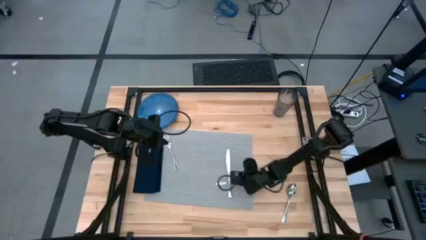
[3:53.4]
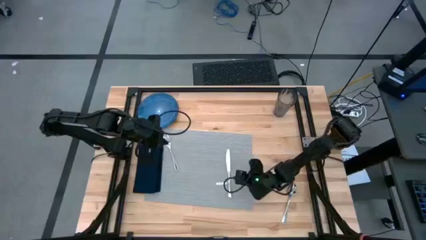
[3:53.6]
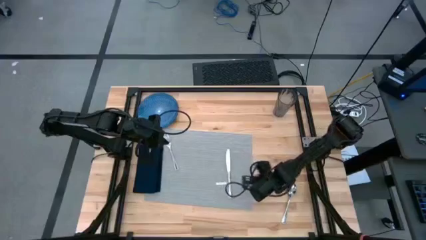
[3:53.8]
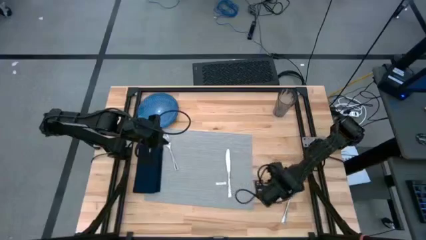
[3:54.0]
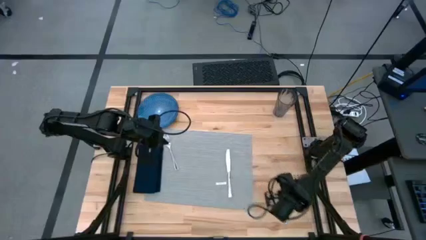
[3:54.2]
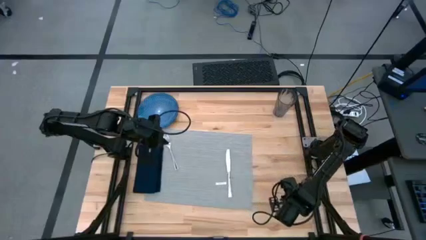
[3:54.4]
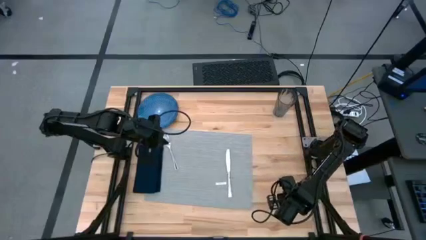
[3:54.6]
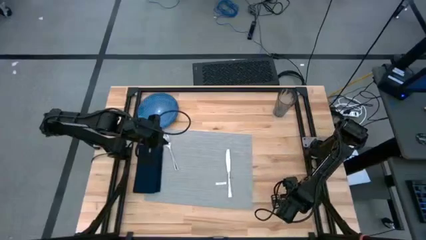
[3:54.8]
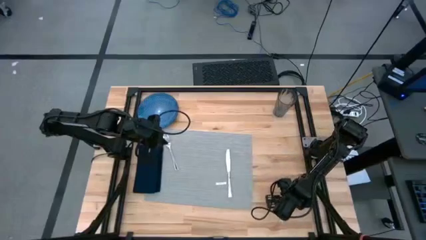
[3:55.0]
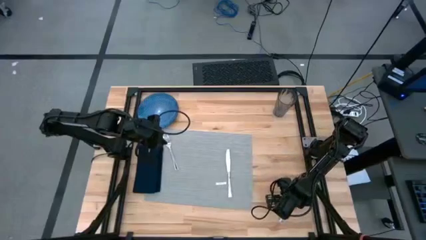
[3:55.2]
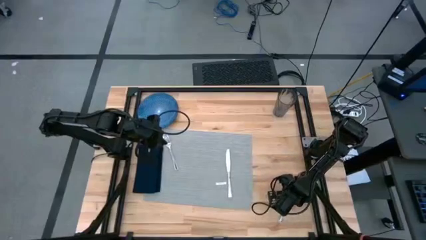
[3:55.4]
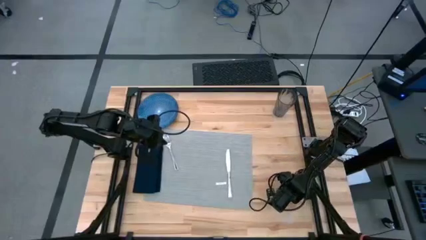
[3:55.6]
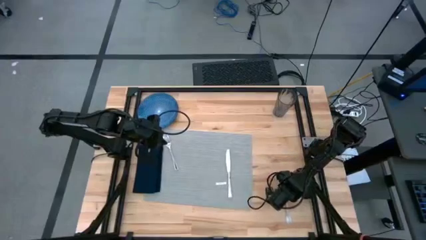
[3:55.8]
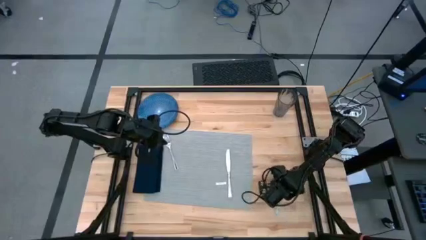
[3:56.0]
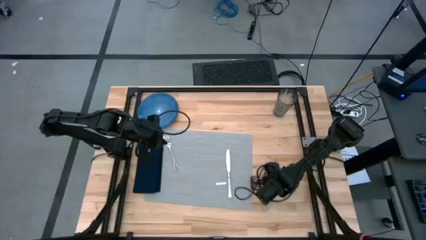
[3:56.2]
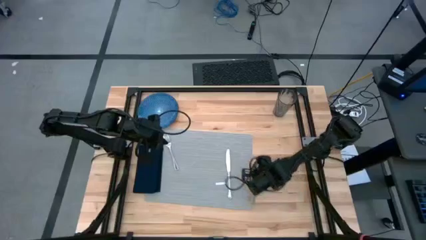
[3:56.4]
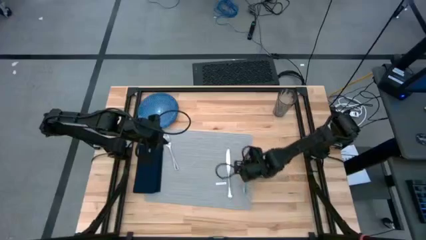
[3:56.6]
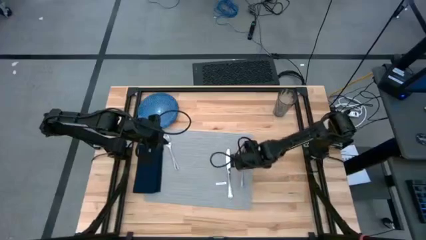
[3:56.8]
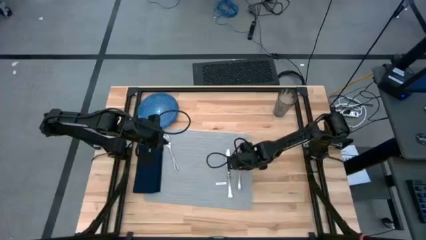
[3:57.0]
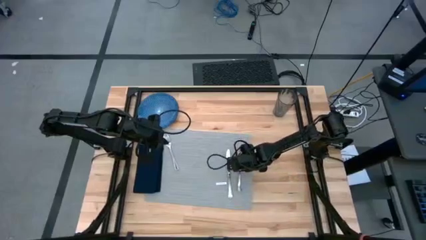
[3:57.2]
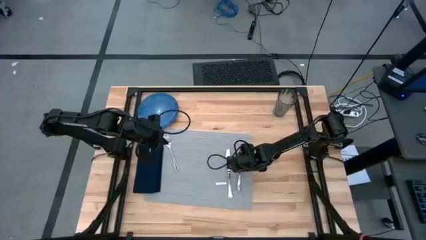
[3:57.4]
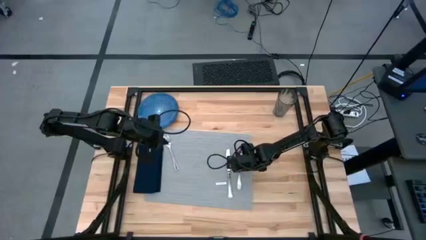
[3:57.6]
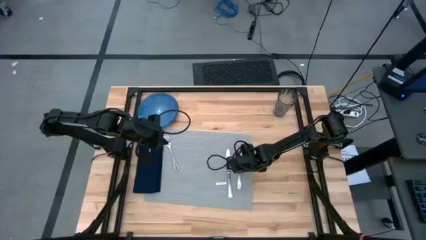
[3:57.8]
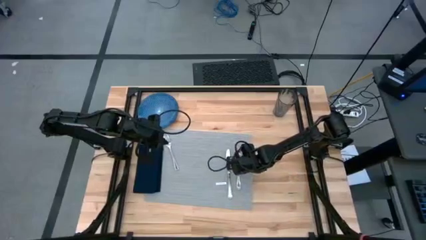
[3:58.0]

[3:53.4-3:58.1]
Task: Set table place
Put the silver spoon on the gray placemat beside the silver knife

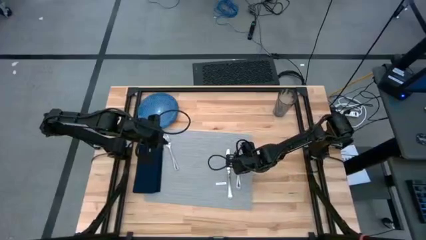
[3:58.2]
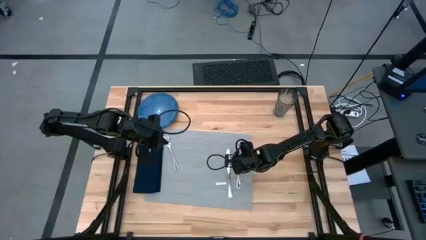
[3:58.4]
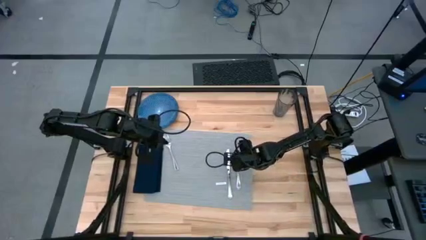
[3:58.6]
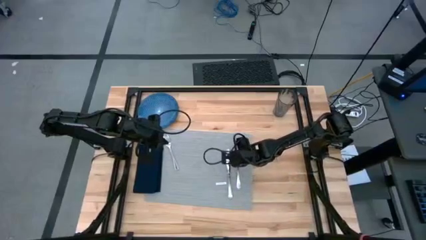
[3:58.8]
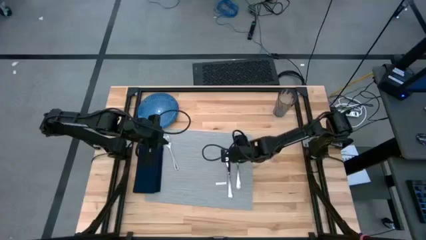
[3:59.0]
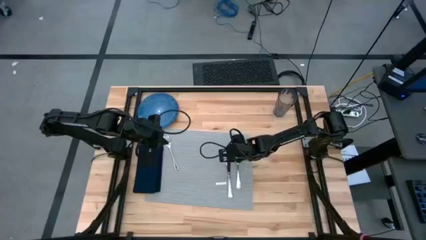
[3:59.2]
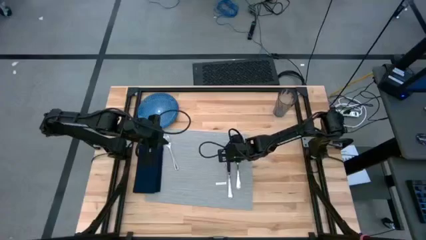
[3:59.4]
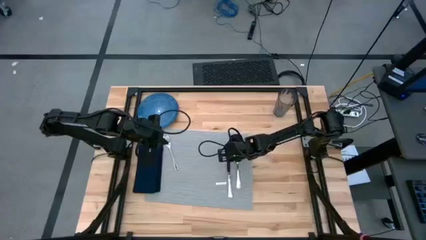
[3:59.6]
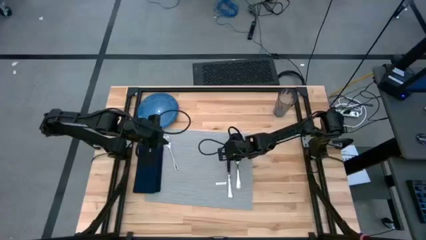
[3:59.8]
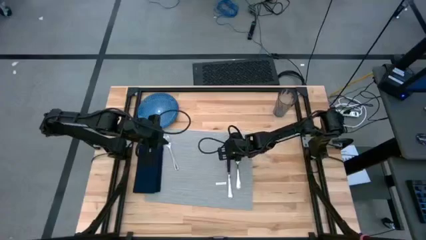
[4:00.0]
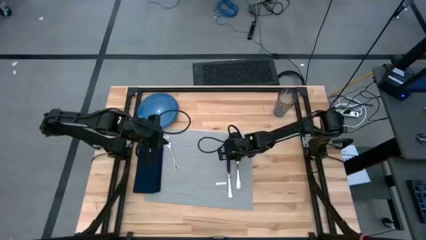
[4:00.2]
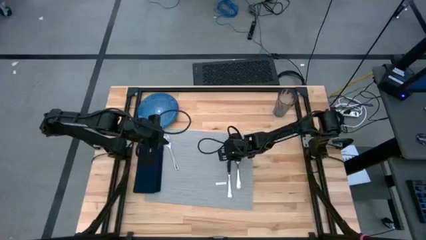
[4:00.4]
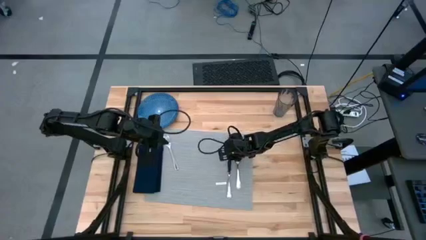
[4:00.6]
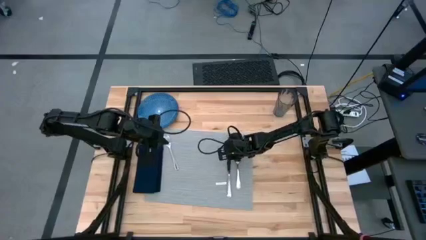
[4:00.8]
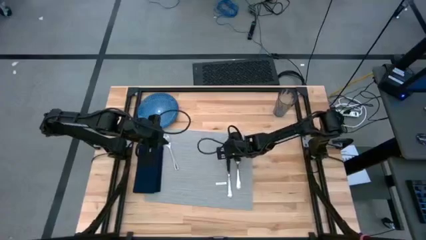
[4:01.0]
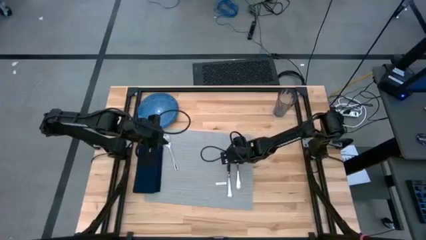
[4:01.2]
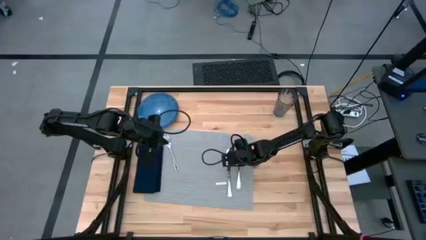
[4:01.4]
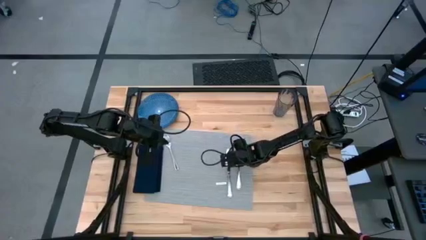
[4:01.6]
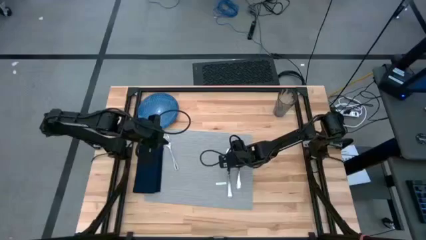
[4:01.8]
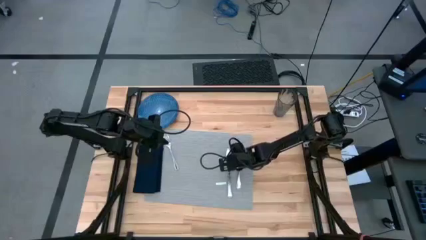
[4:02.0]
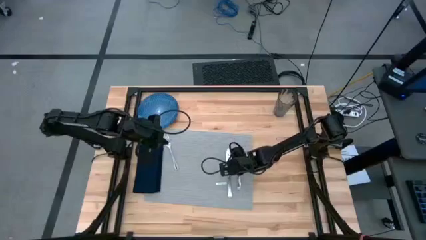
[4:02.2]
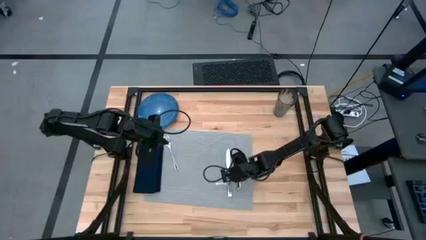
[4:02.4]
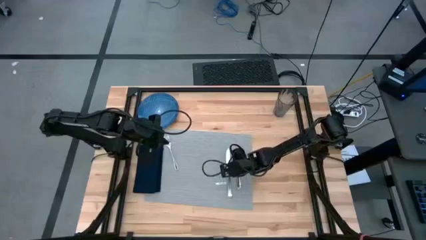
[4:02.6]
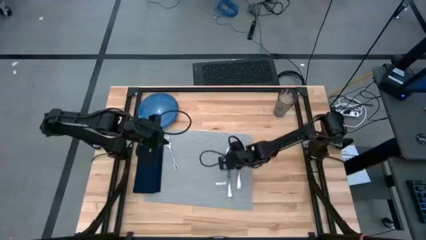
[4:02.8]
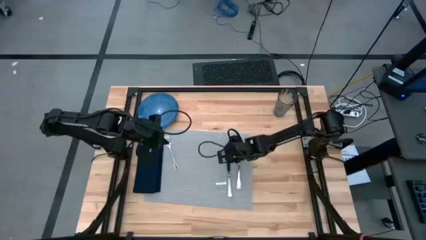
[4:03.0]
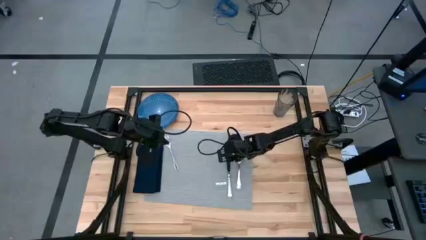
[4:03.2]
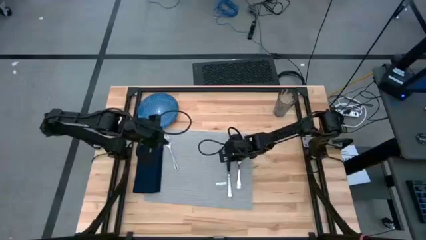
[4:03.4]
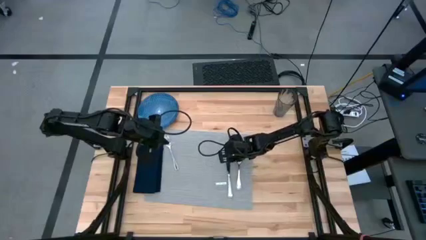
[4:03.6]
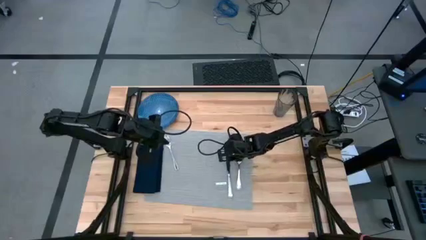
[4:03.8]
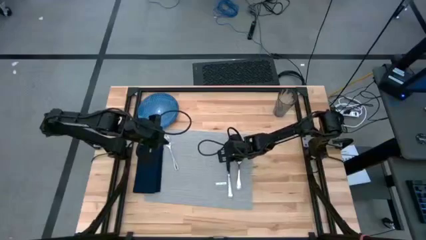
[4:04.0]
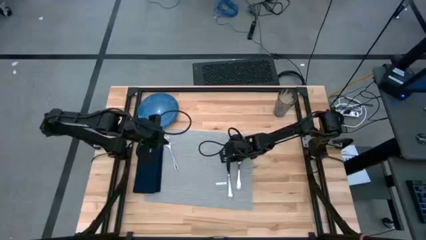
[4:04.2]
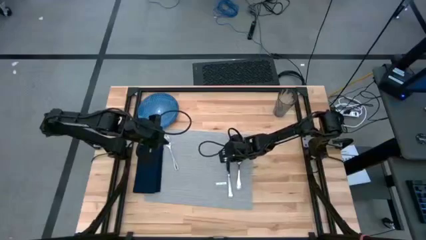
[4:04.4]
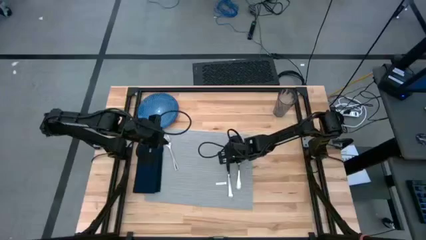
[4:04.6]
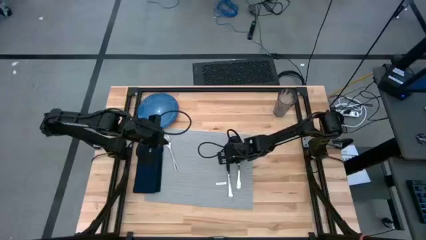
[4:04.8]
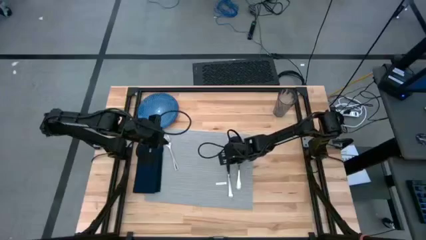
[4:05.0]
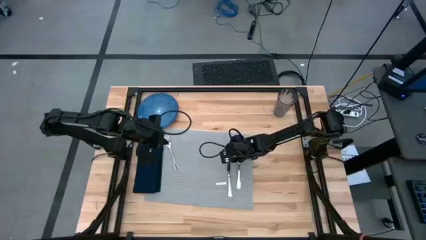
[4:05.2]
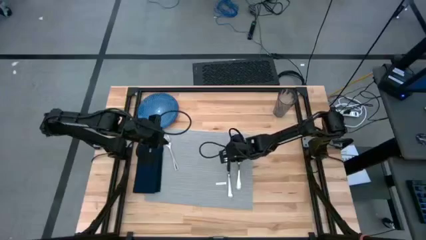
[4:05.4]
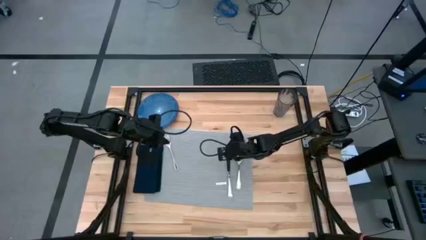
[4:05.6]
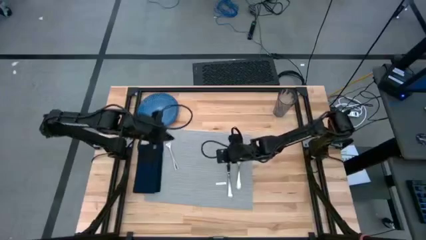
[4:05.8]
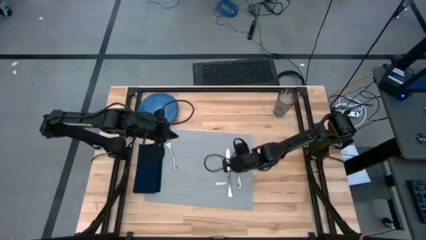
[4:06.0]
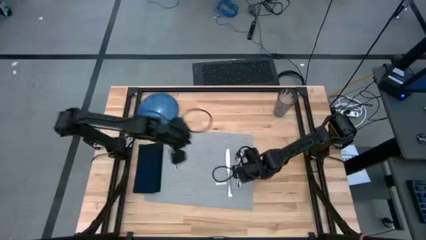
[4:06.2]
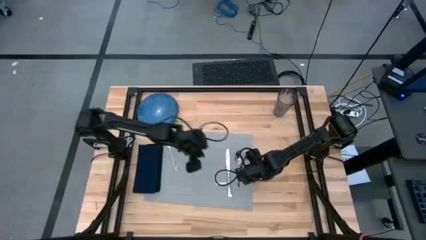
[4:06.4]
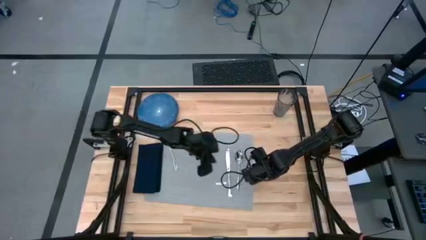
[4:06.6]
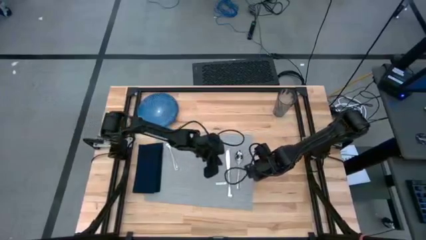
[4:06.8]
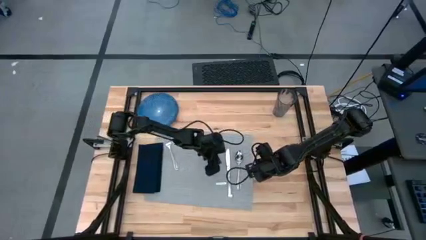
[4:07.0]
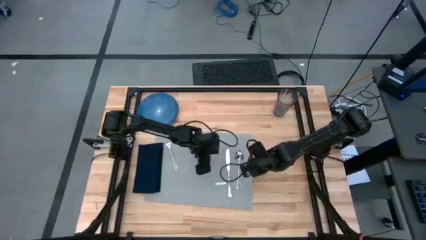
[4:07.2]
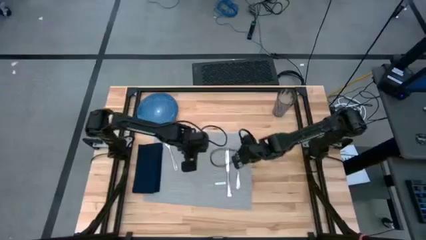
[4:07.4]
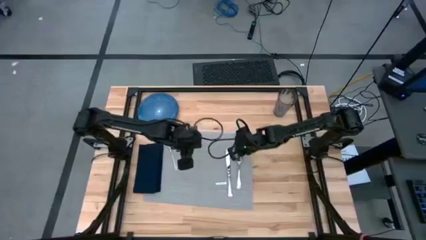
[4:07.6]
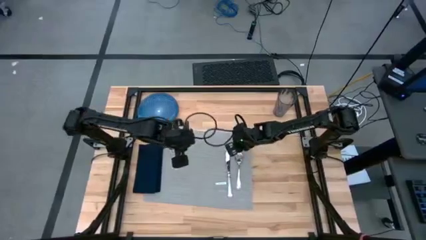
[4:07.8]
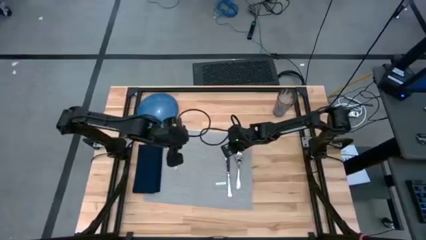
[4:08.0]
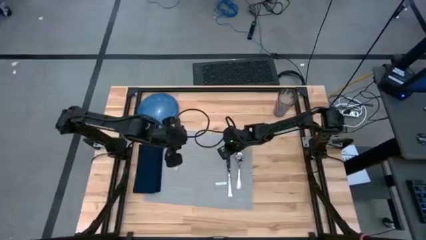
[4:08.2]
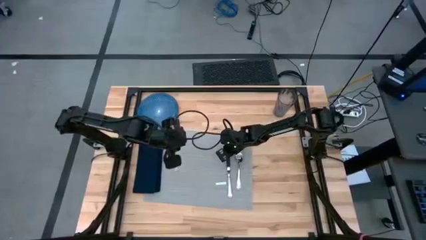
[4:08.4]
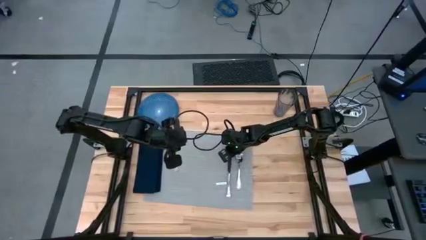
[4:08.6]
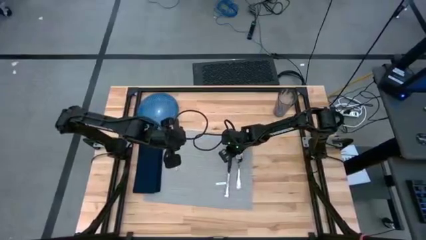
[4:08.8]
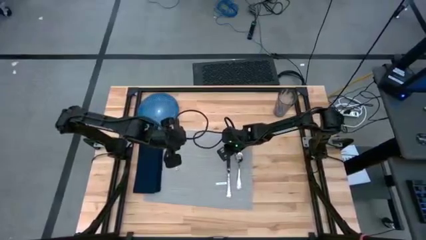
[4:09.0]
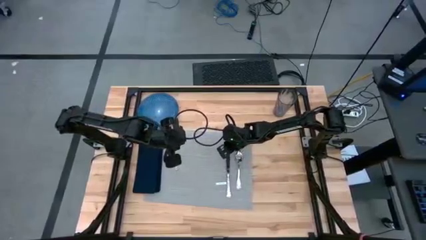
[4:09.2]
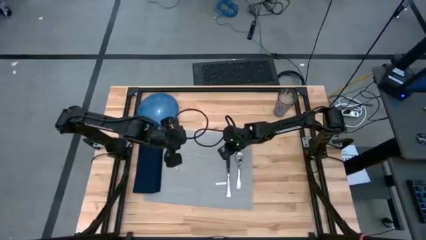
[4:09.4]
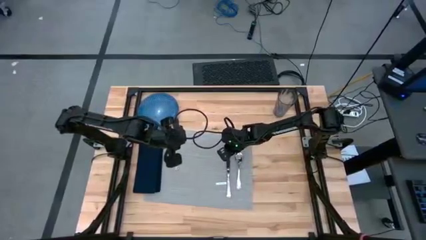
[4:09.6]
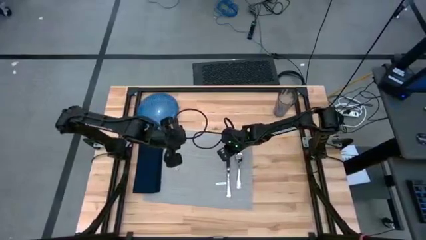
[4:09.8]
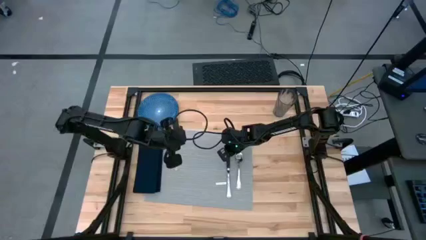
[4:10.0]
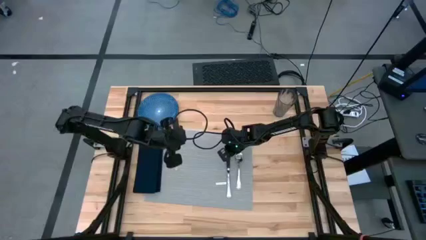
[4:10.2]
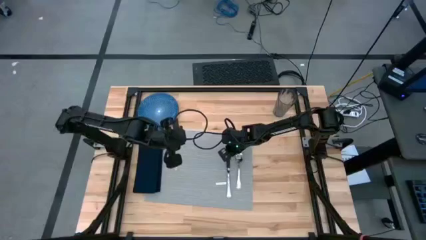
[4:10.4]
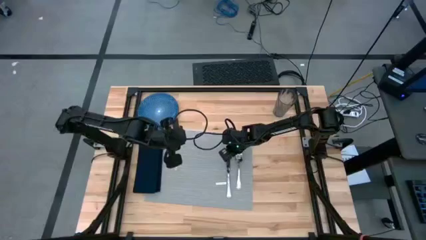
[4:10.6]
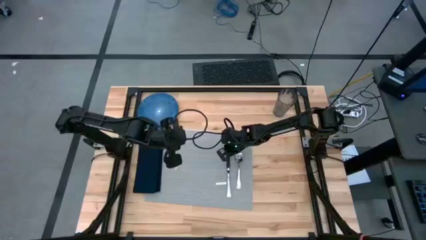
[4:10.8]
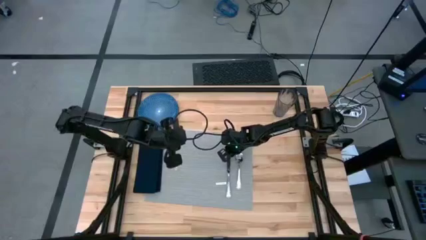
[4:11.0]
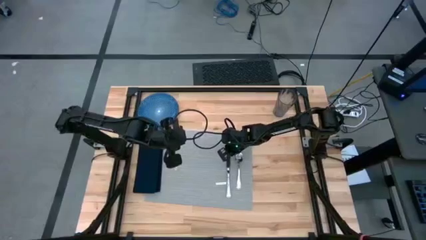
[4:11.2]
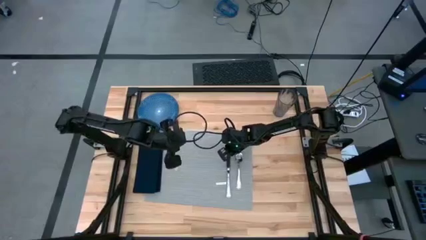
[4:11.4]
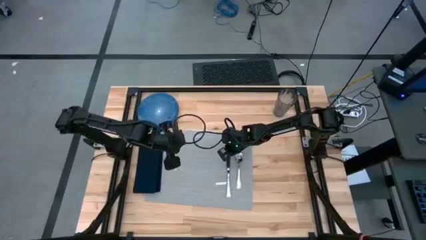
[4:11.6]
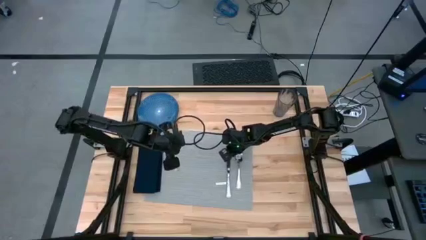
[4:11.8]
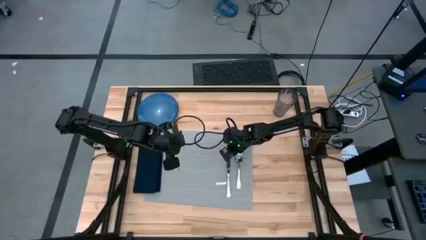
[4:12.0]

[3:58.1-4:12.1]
Adjust the silver knife
